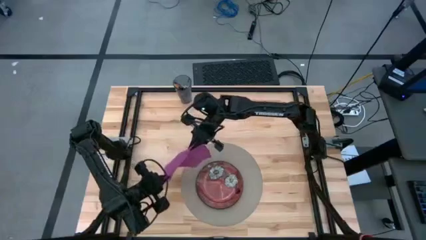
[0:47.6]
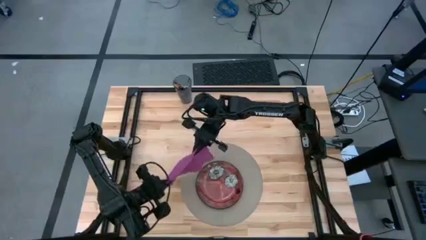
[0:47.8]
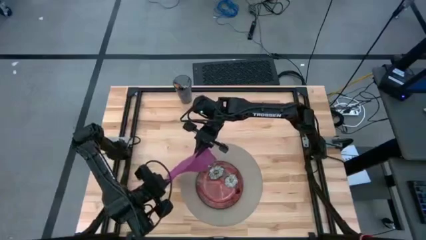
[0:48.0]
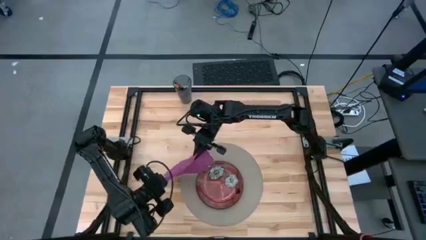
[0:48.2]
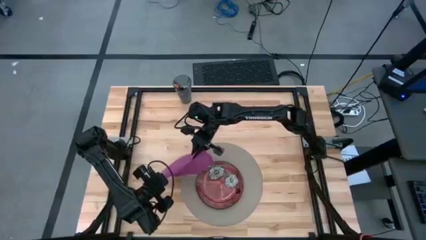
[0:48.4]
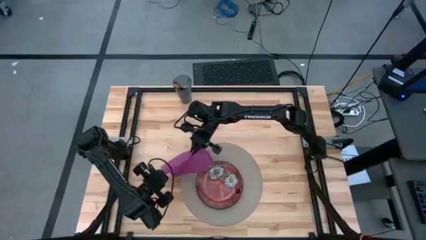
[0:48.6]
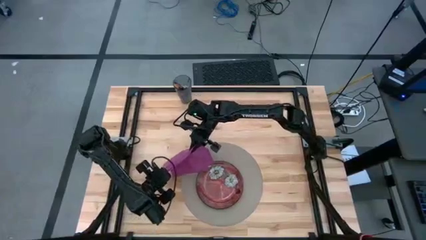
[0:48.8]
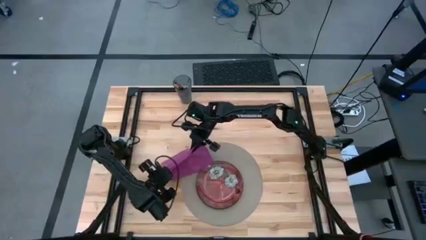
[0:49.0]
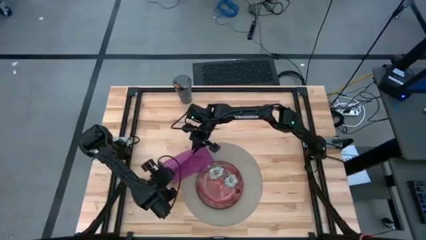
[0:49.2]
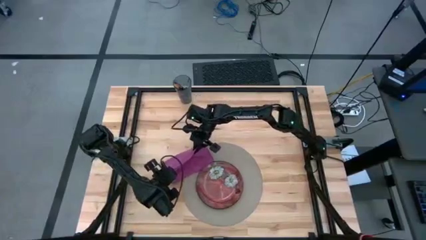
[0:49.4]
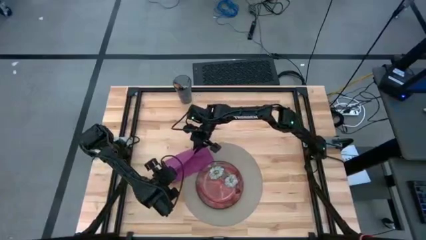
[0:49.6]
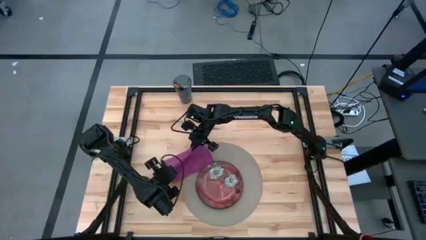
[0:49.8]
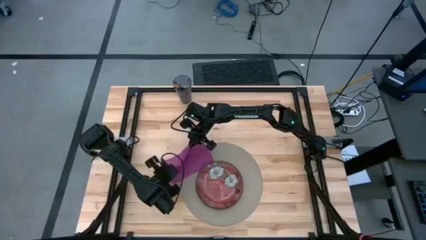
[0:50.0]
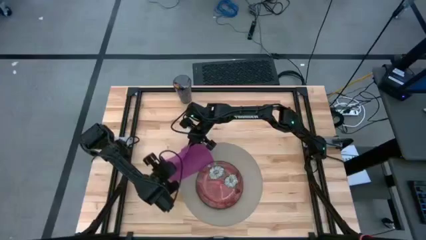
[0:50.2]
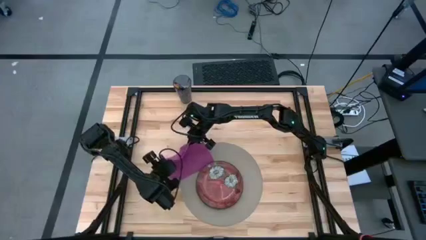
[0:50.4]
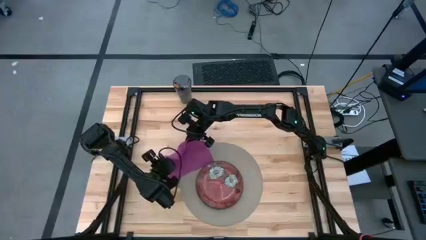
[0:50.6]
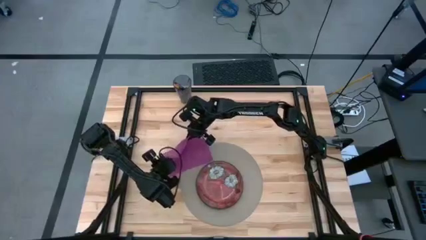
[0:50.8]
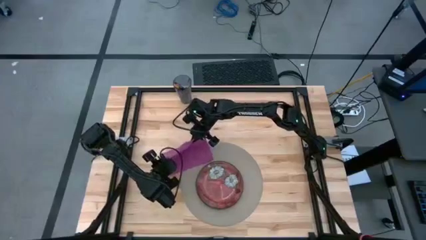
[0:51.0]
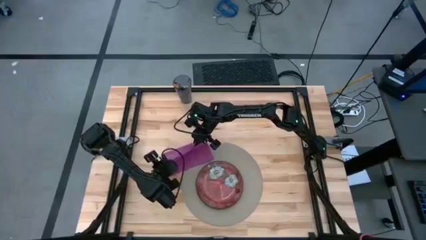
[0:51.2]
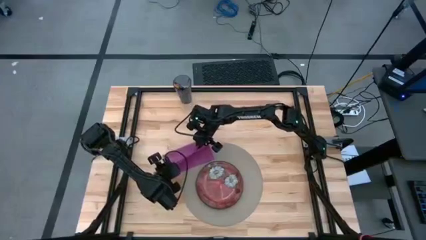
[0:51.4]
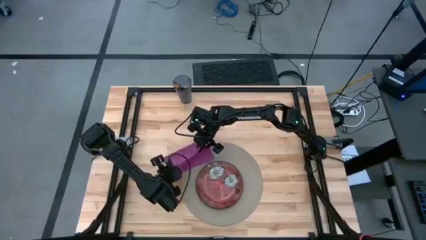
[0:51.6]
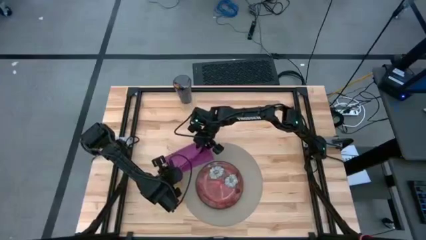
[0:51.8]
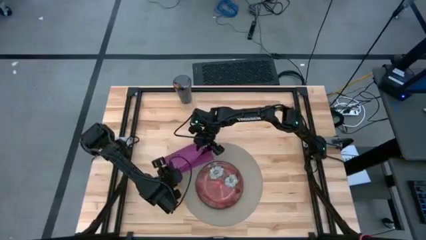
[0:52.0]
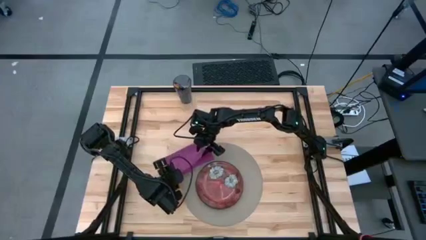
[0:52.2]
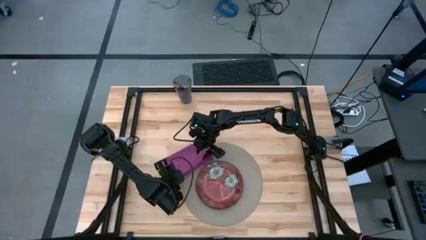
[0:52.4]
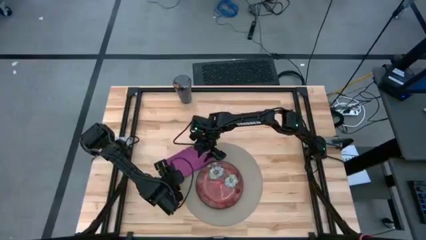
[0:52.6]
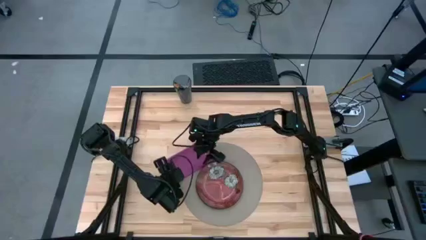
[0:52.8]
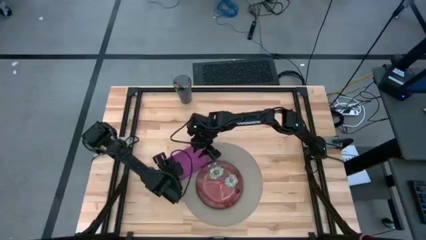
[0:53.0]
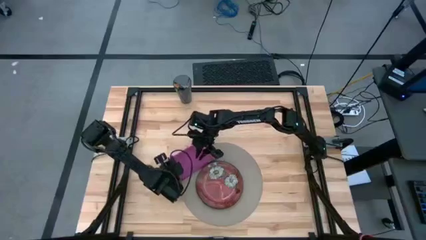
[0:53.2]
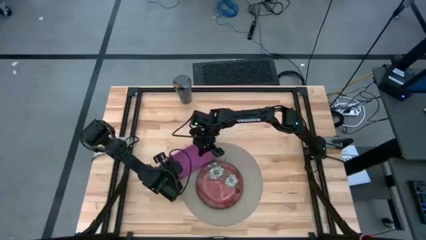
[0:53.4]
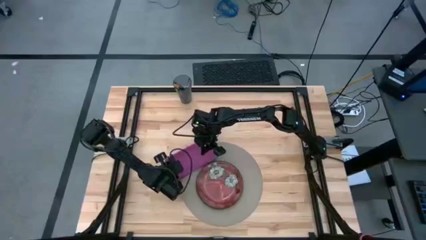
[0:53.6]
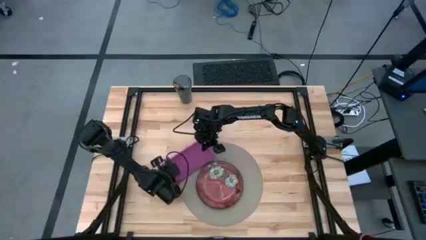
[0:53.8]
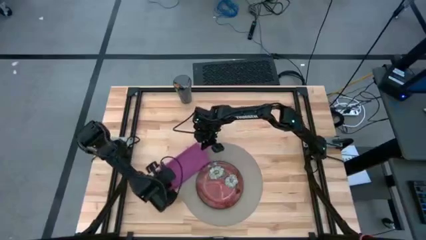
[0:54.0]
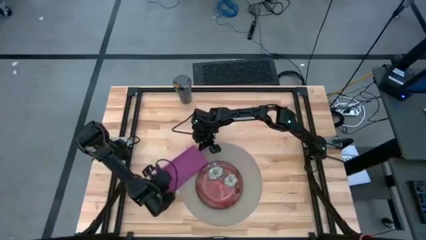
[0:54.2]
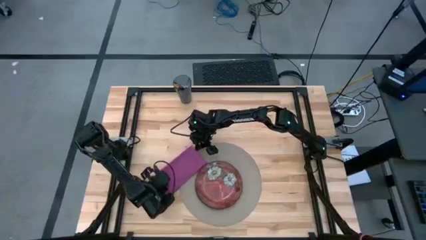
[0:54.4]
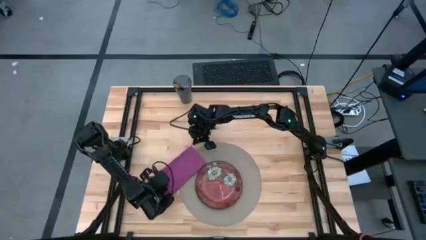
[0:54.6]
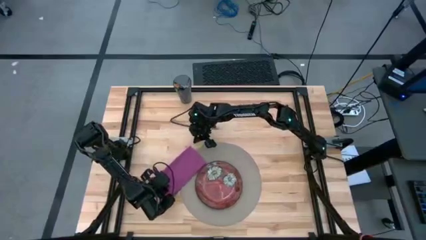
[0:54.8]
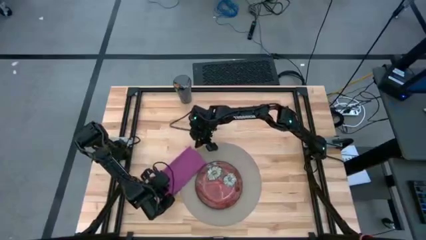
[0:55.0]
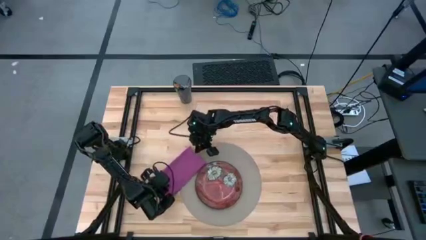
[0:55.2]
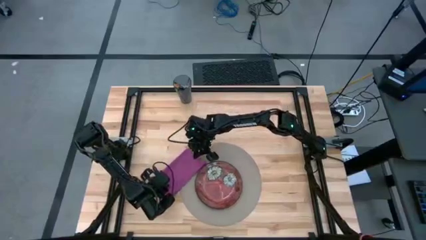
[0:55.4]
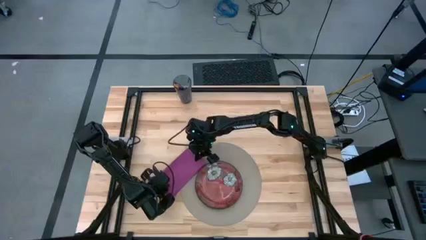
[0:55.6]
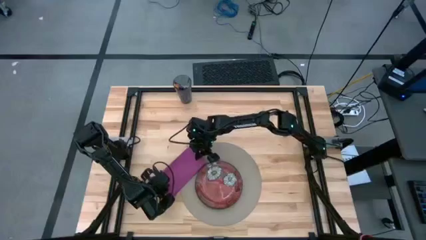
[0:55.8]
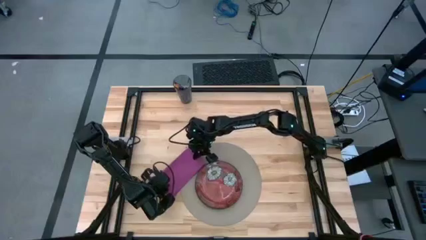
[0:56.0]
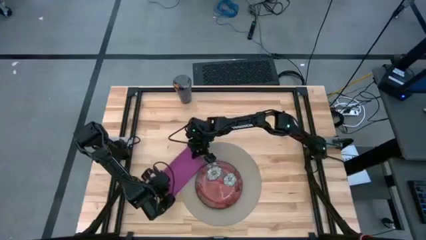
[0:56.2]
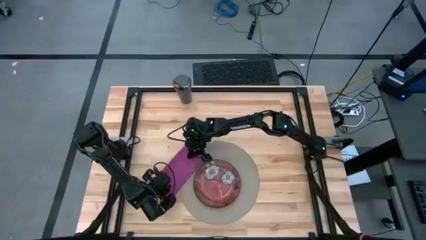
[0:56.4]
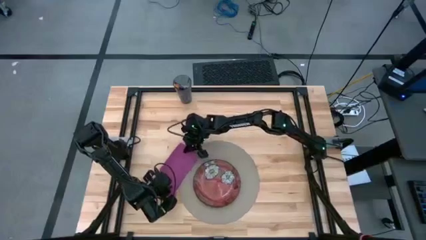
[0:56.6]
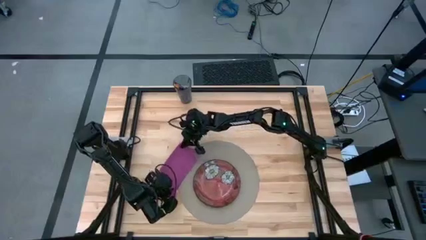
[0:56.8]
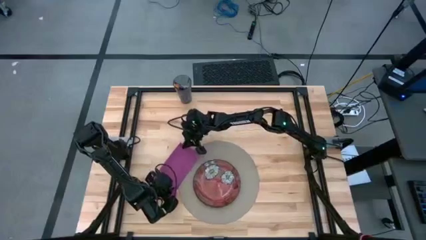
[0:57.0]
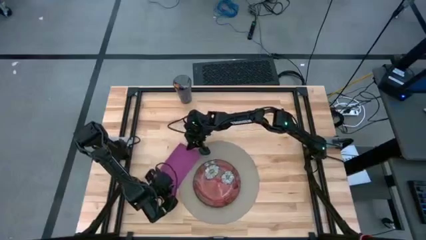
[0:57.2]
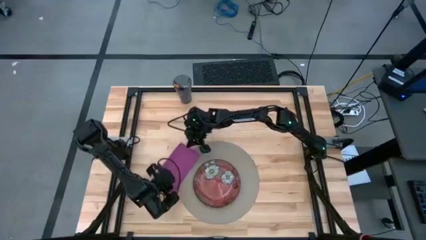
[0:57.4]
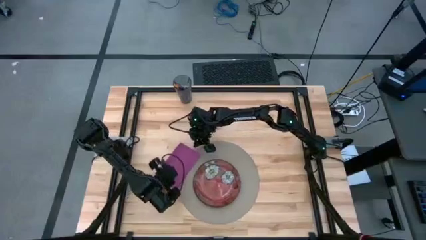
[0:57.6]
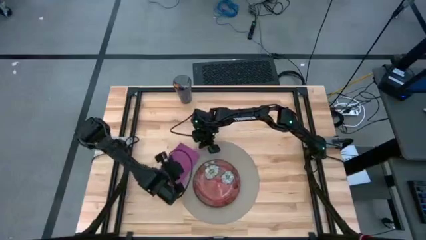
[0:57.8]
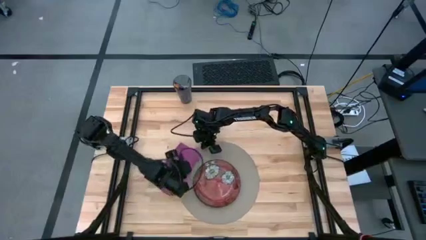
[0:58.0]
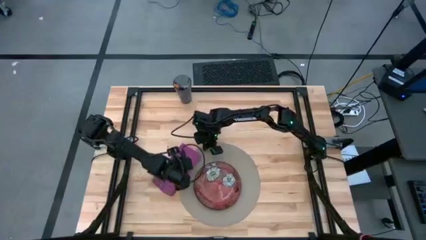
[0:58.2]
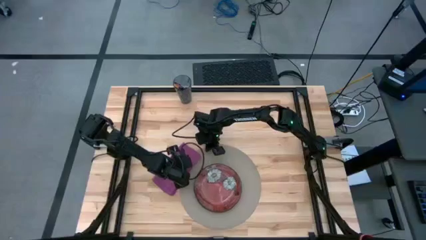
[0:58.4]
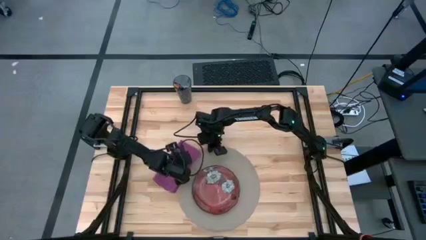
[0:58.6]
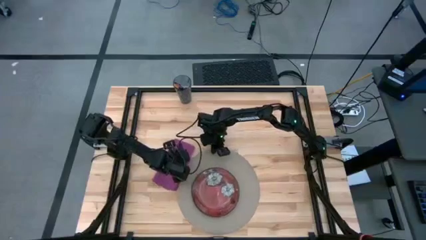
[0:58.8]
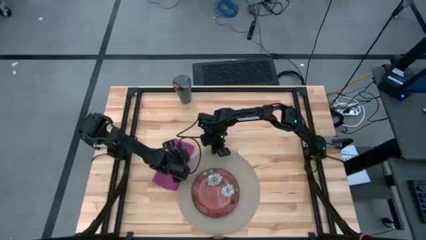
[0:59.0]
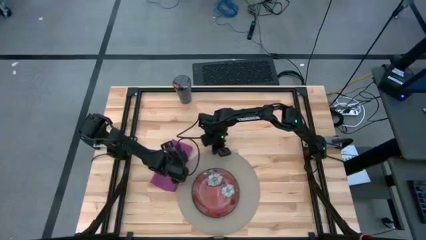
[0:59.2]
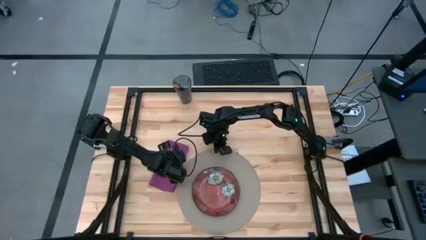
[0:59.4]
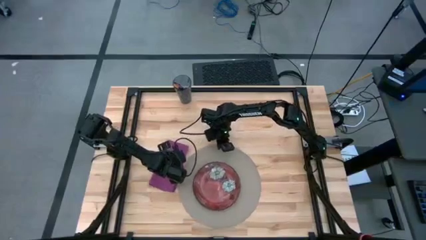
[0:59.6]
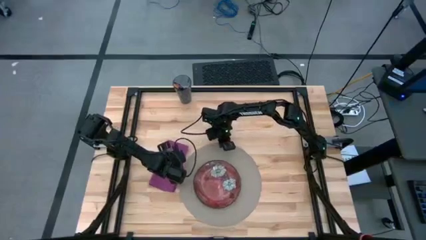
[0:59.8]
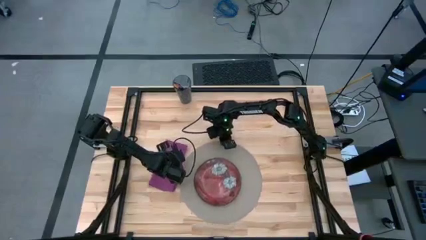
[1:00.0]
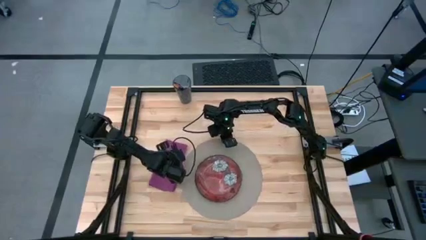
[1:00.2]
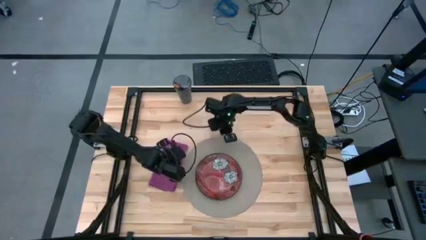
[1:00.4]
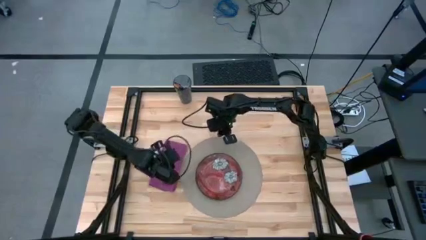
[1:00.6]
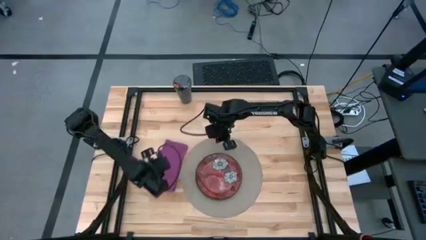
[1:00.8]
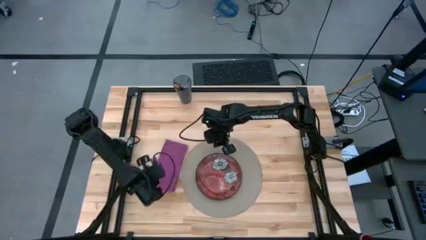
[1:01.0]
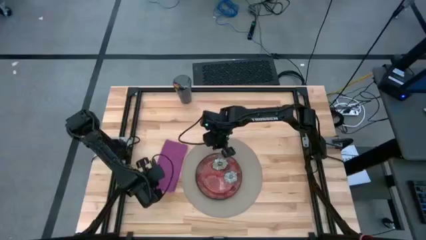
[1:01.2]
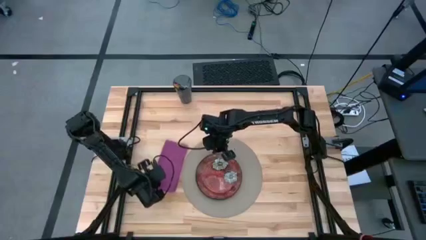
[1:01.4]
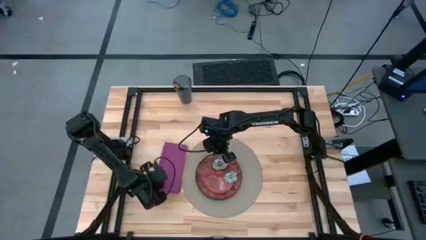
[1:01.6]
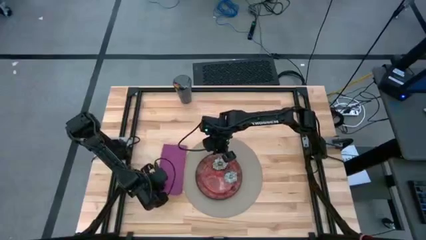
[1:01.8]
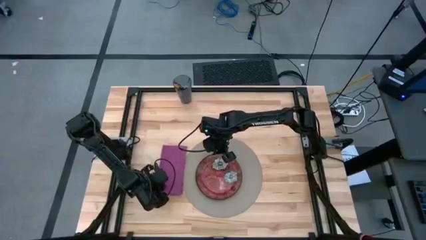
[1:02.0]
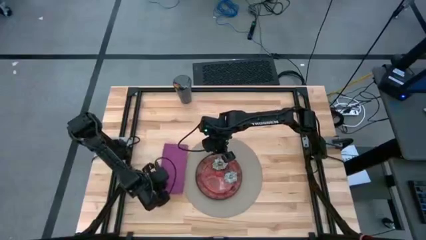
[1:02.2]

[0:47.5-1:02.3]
Task: Set table place
Move the pink napkin to the middle left of the table
